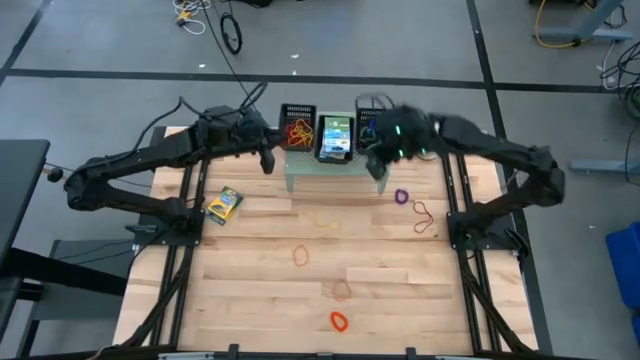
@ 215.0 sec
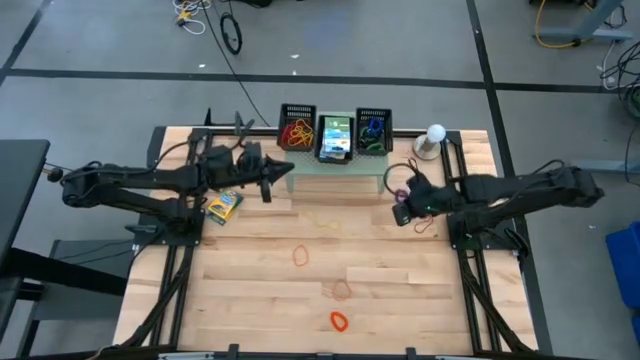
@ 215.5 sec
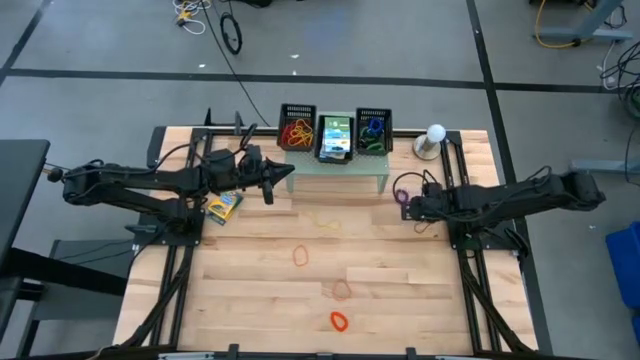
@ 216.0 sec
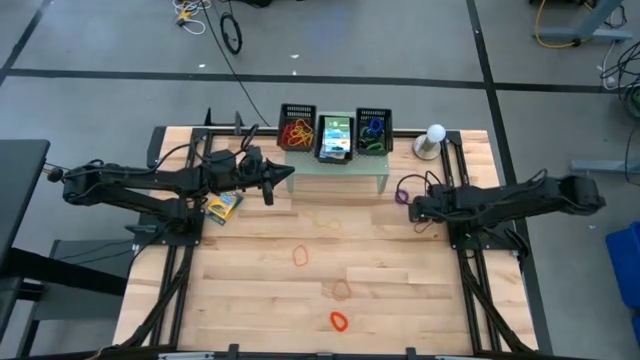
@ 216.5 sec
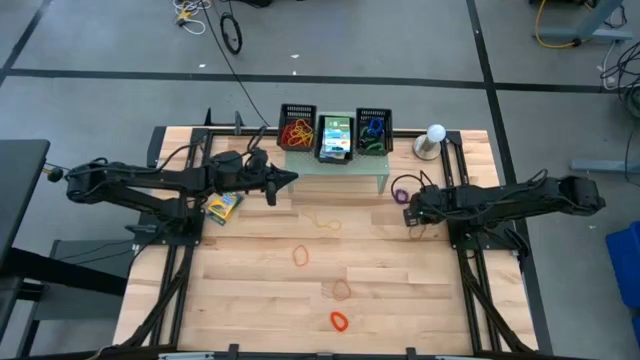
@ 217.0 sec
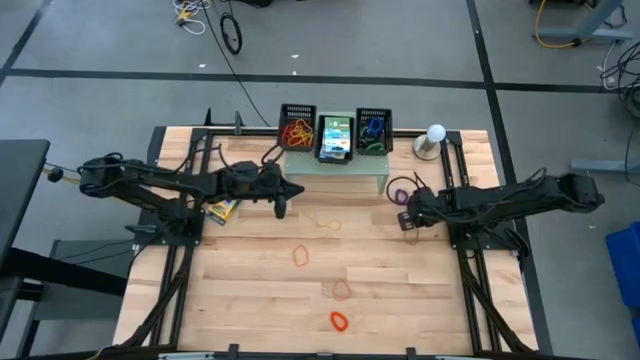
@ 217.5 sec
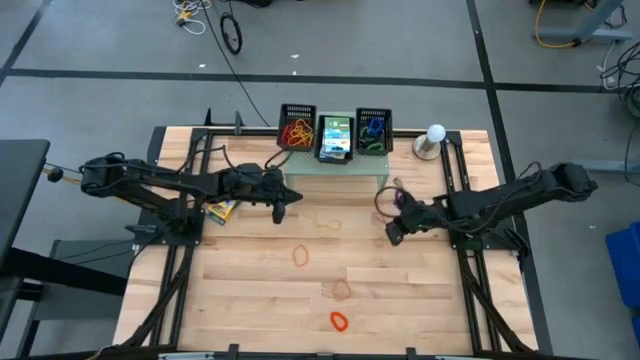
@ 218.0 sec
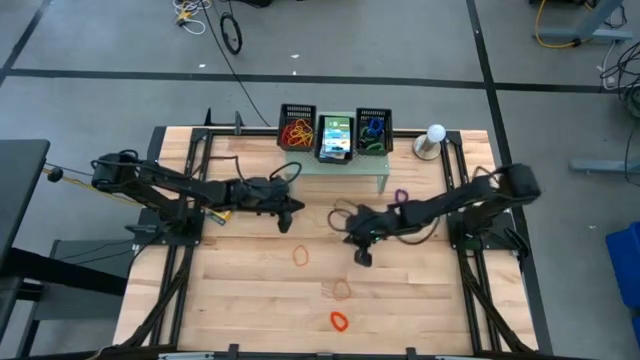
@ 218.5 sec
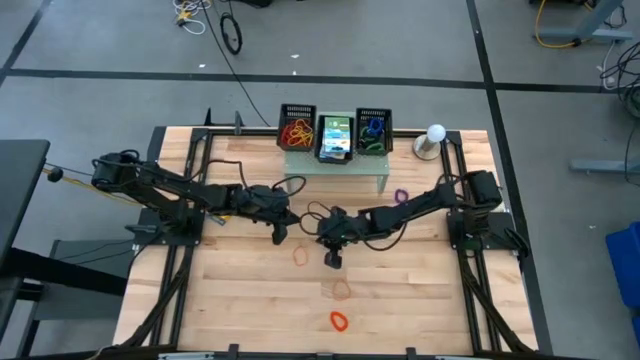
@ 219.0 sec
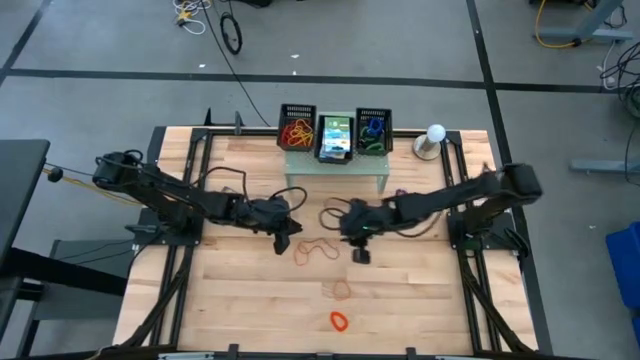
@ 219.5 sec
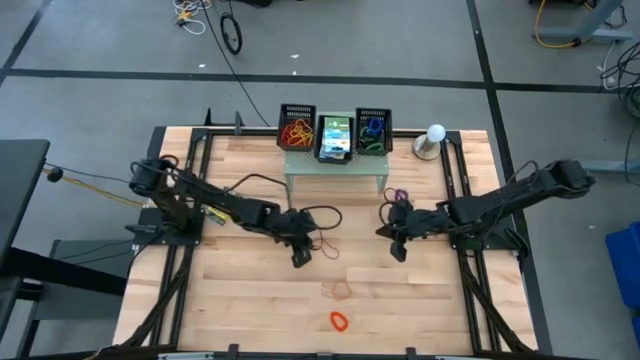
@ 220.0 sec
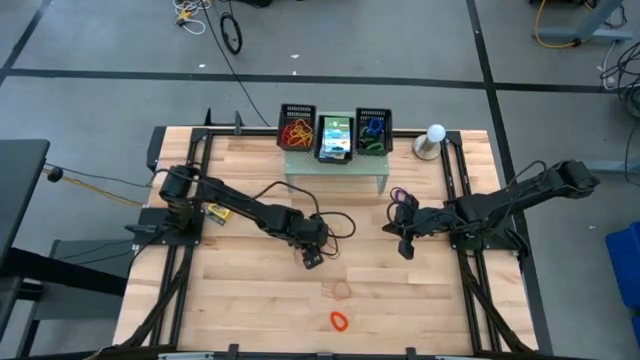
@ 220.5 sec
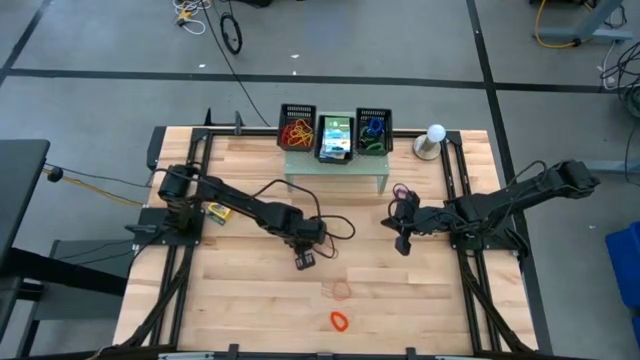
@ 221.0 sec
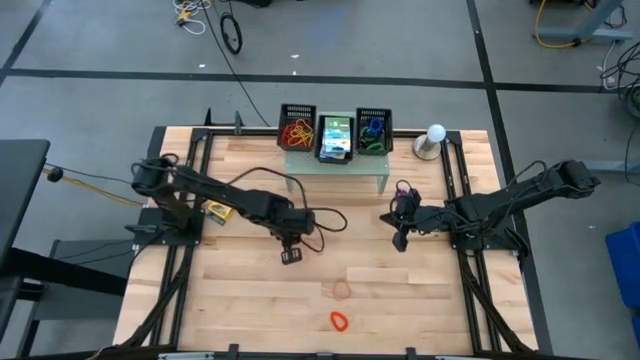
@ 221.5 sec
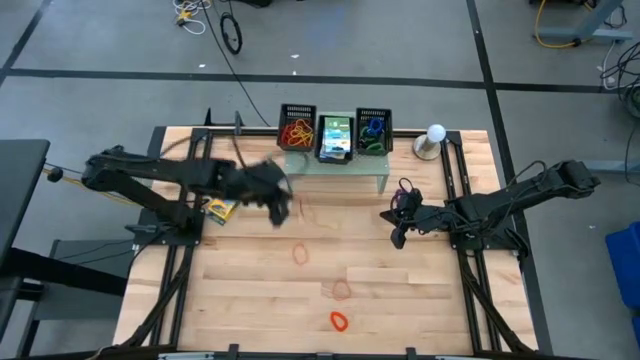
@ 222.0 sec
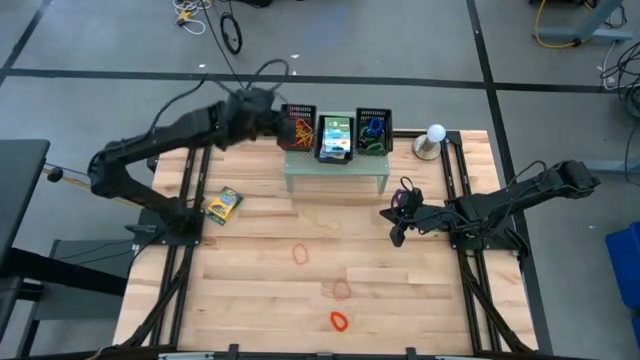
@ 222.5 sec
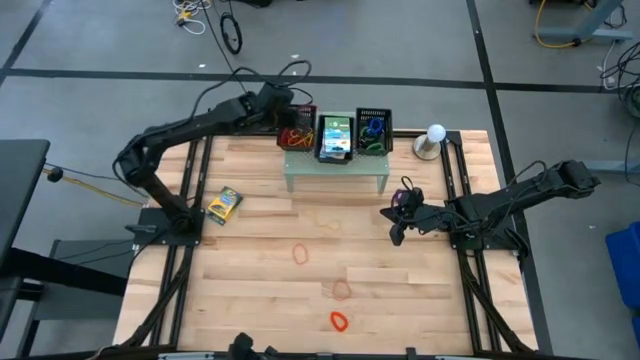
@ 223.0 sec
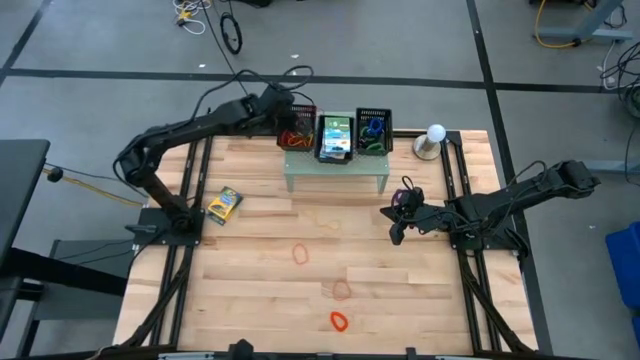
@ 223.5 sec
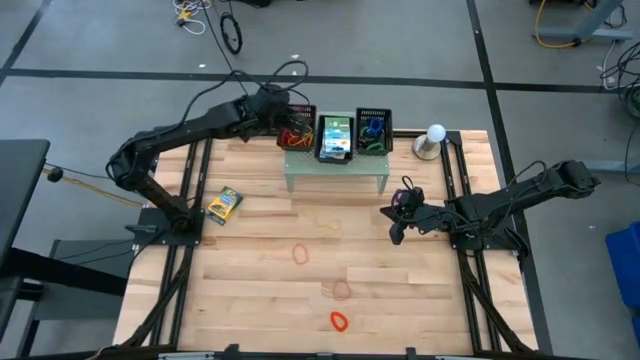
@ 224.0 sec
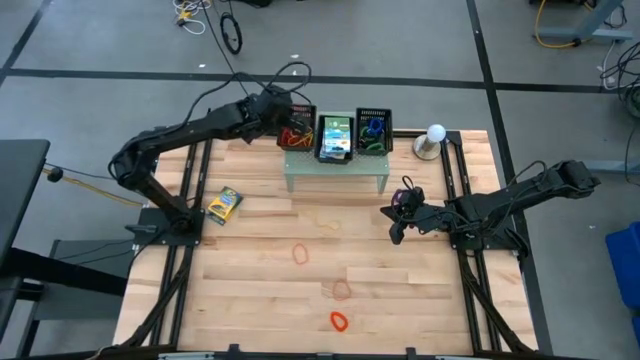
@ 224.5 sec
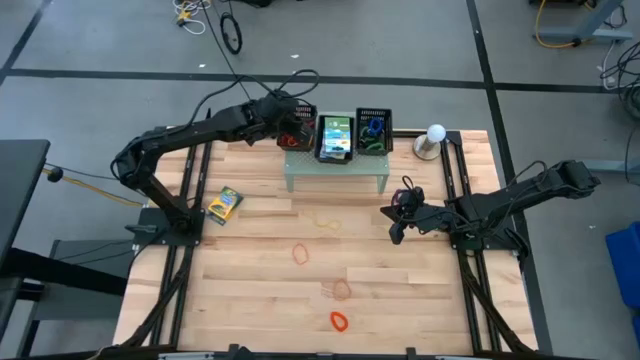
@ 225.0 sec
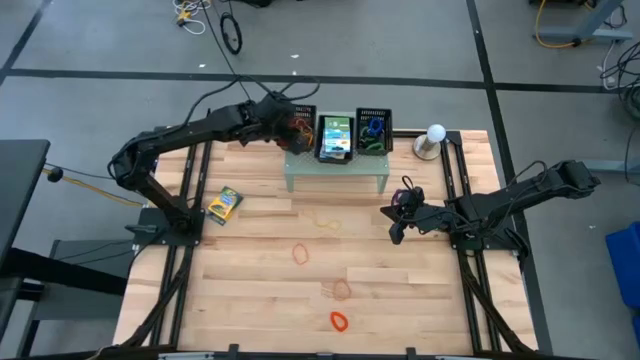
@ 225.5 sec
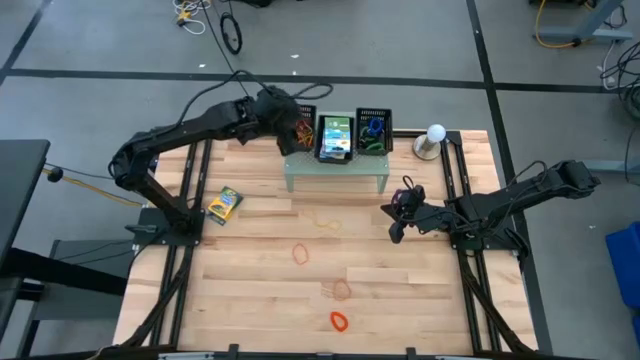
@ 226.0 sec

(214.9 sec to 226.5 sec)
Task: Pick & Place Office Desk Supplies
Put the red rubber band into the left black bin on the shelf

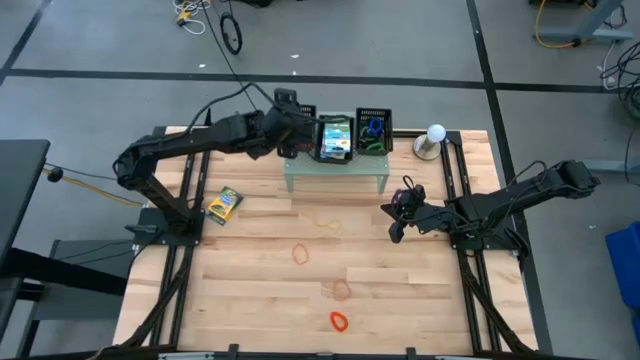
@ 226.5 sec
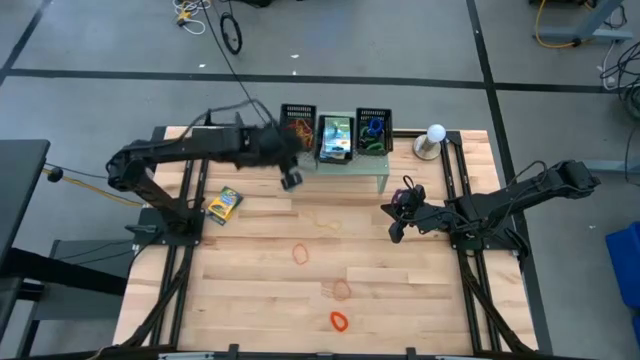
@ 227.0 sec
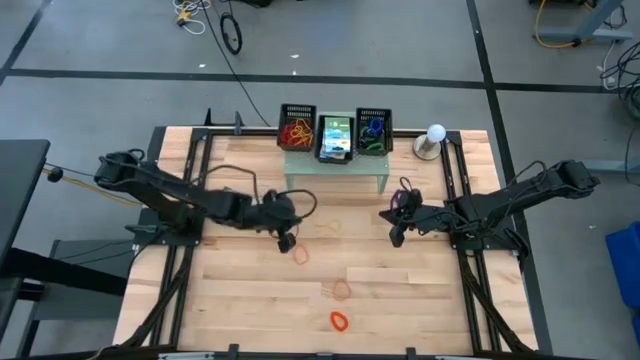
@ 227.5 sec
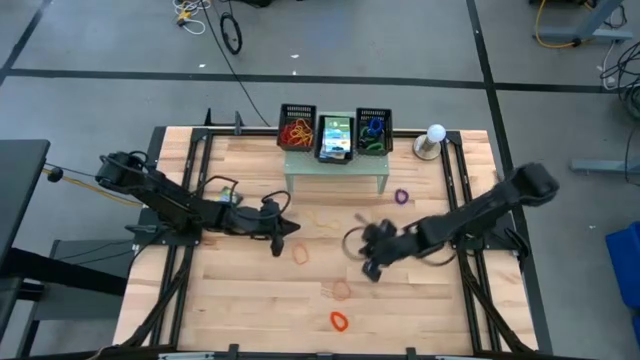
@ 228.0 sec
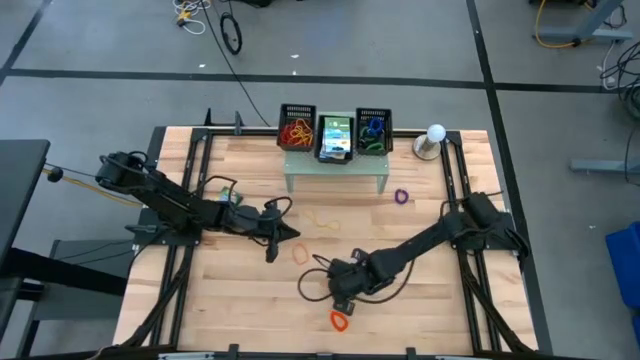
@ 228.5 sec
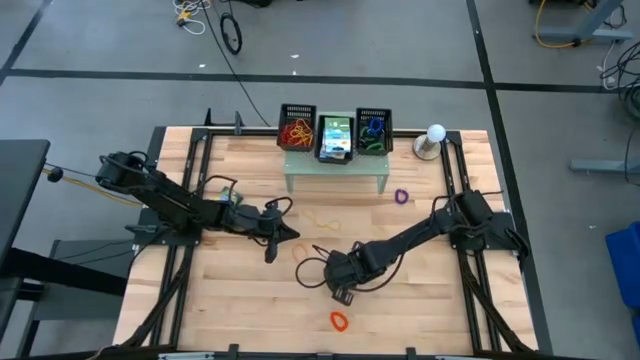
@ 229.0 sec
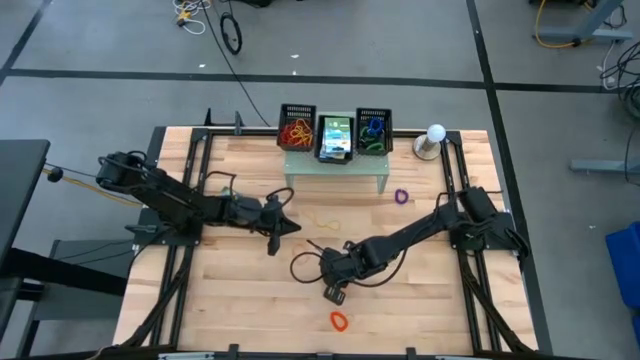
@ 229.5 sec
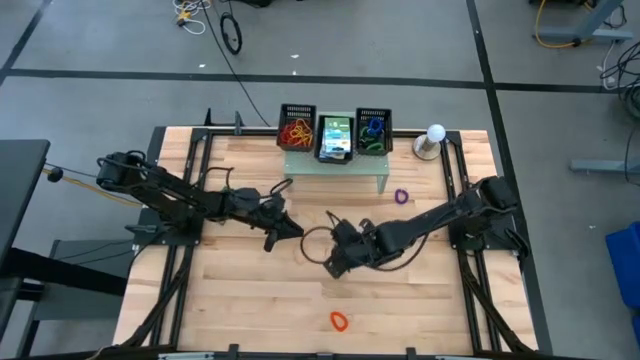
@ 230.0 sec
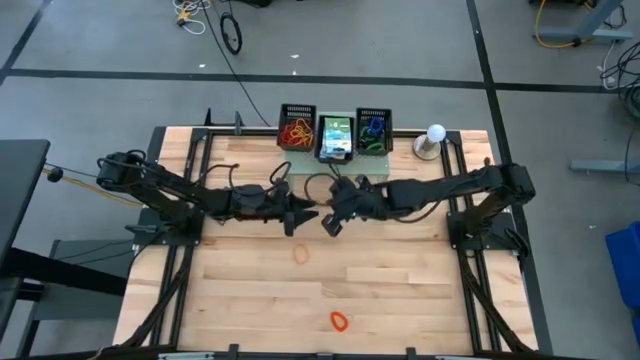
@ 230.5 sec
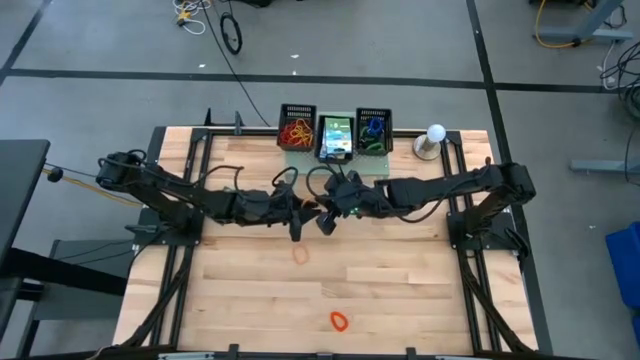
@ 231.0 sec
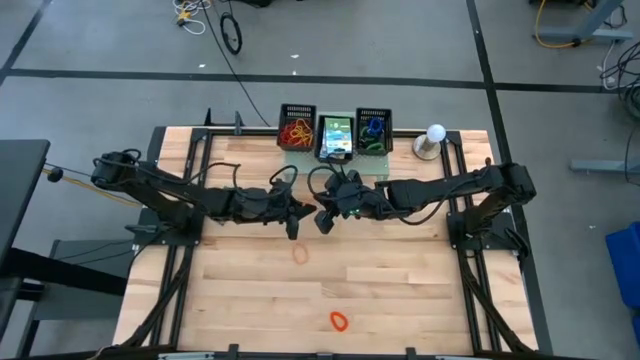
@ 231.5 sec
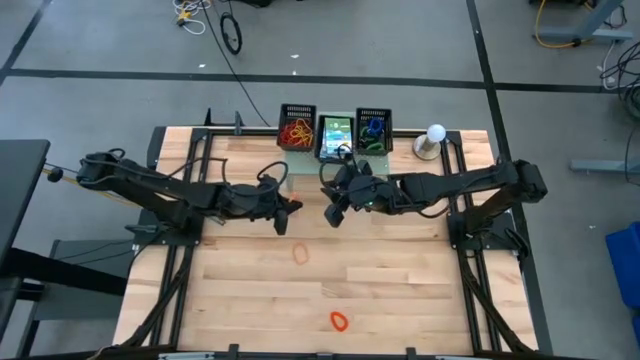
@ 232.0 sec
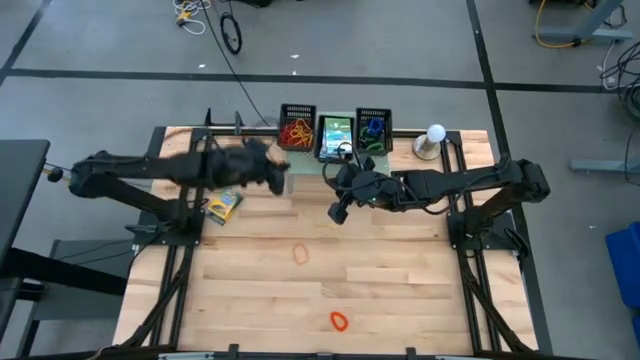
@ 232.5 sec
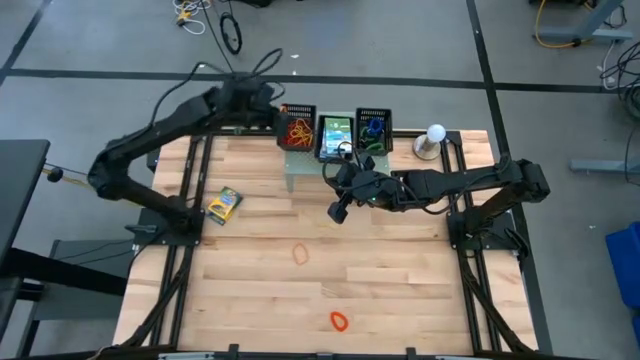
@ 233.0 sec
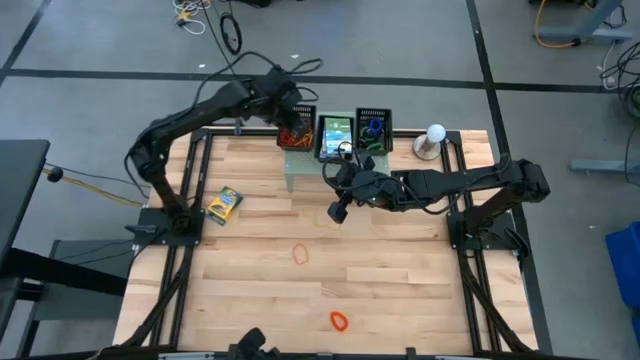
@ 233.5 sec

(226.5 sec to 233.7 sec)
Put the orange rubber band into the left black bin on the shelf

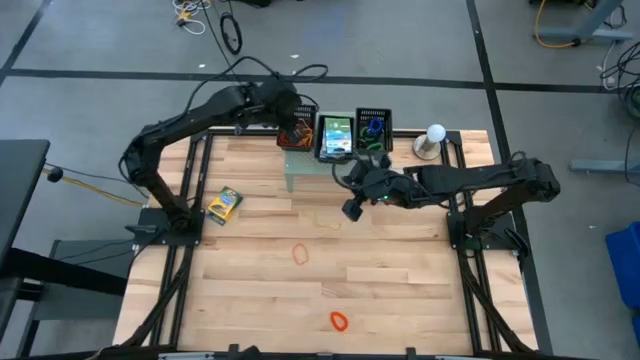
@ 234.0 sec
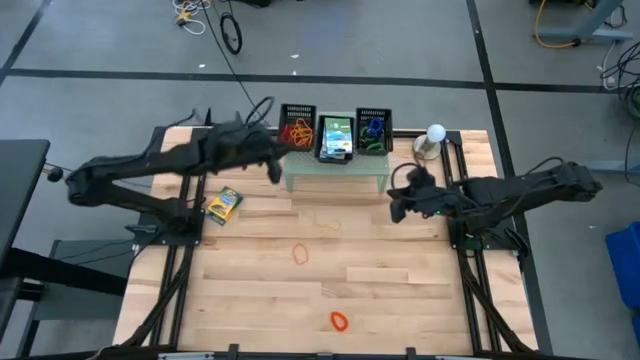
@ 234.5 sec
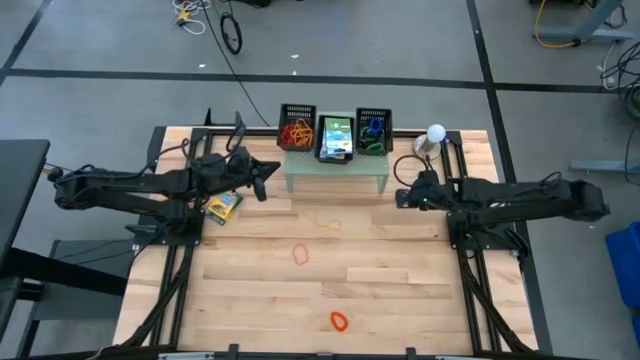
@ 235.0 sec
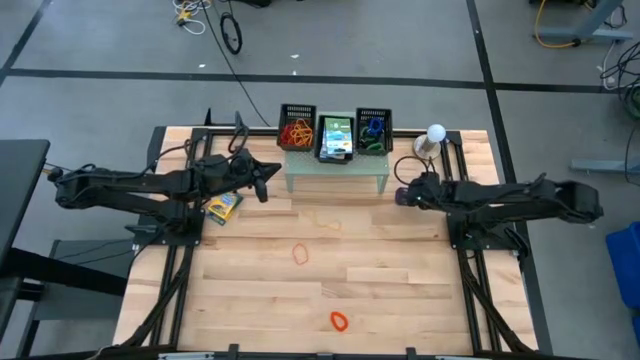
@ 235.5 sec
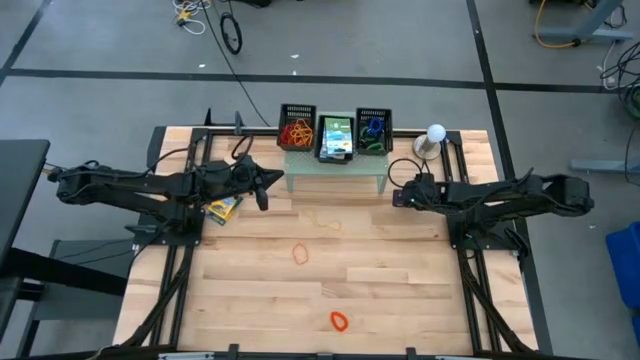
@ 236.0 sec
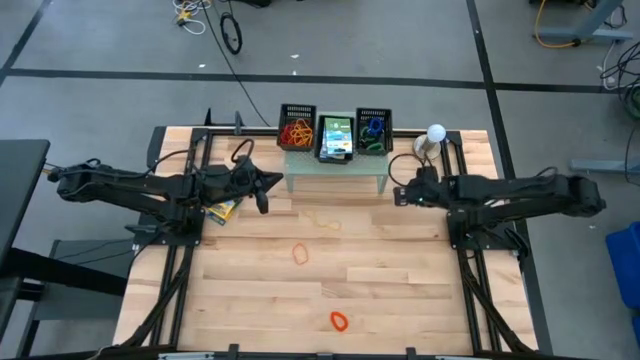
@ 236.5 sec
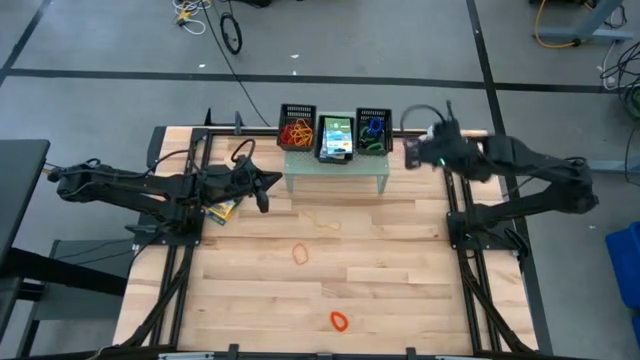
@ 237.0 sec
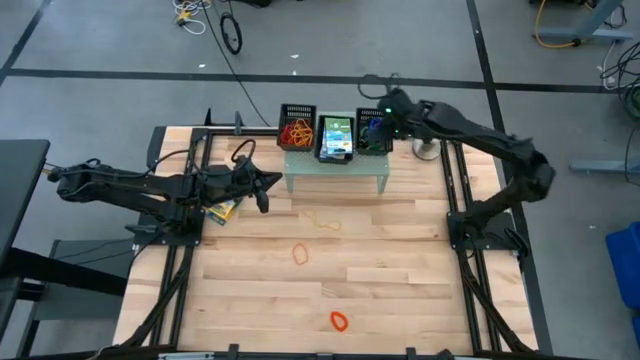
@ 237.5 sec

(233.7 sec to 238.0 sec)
Put the purple spring bracelet into the right black bin on the shelf
